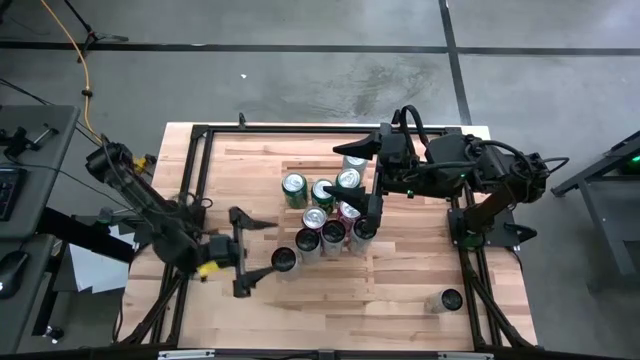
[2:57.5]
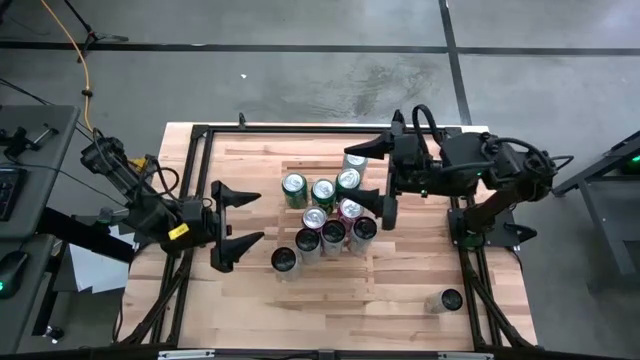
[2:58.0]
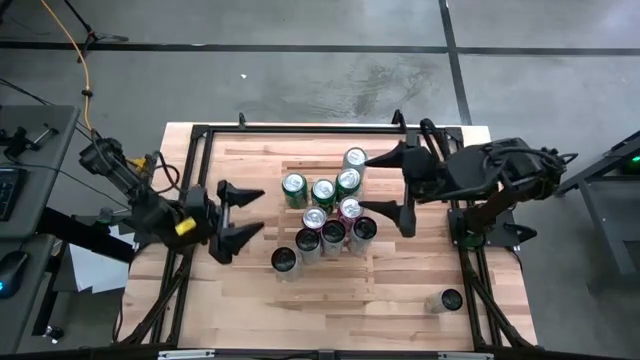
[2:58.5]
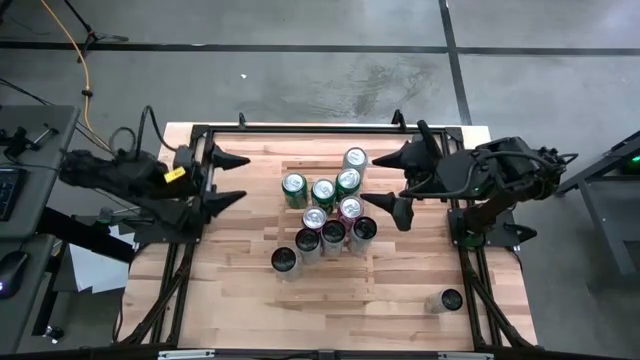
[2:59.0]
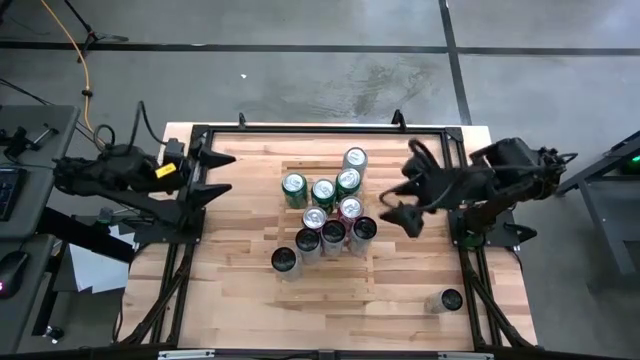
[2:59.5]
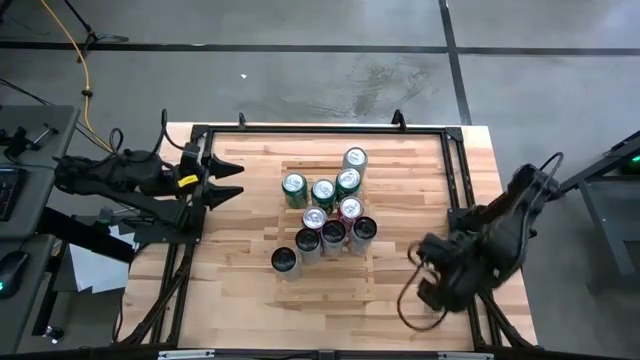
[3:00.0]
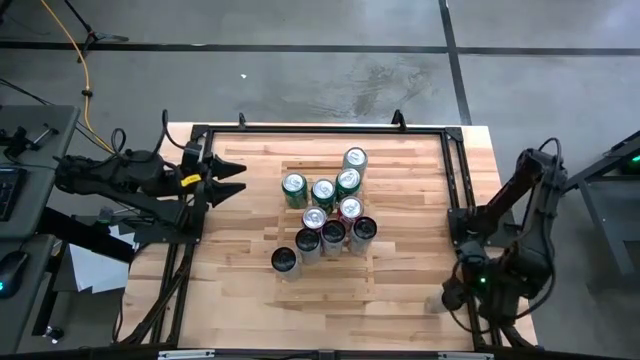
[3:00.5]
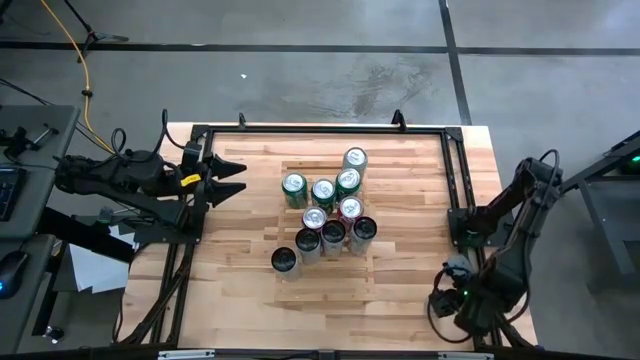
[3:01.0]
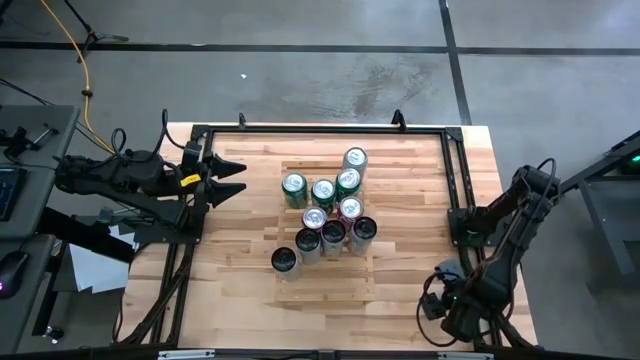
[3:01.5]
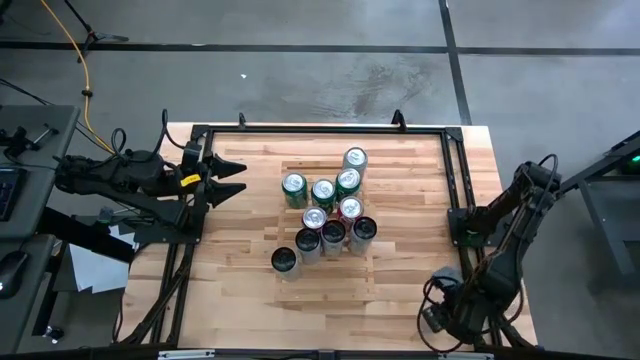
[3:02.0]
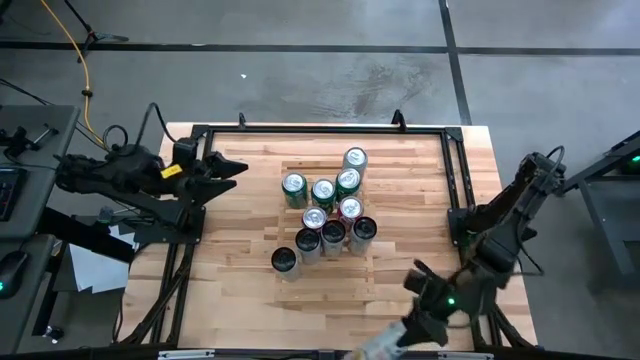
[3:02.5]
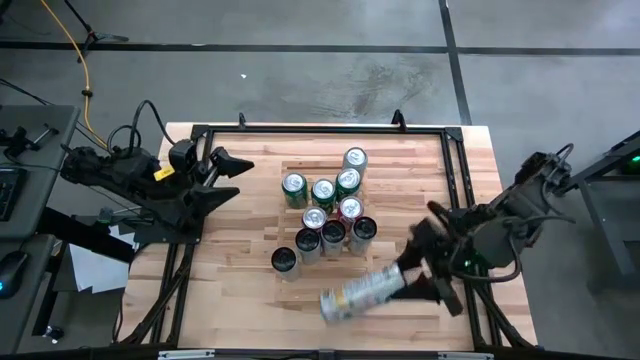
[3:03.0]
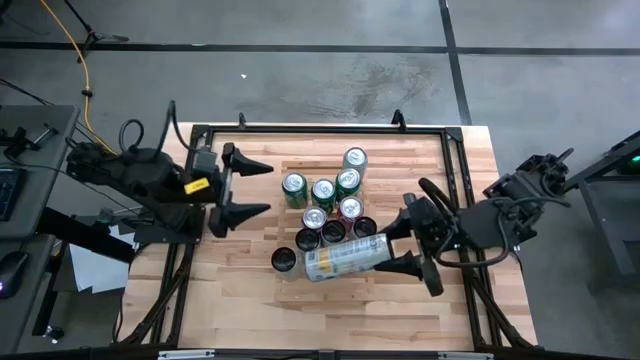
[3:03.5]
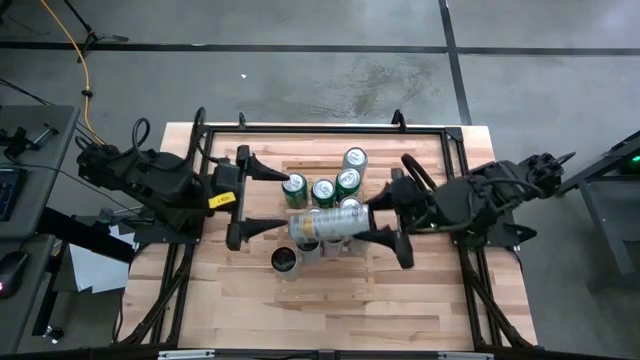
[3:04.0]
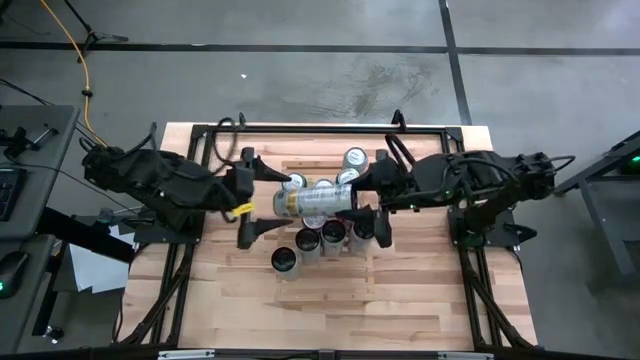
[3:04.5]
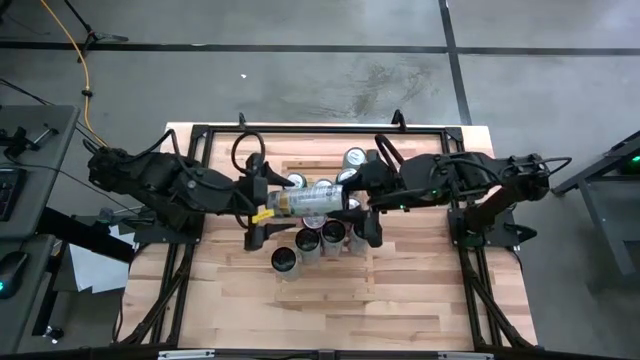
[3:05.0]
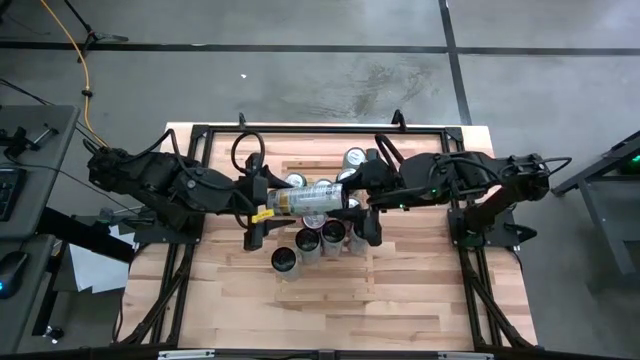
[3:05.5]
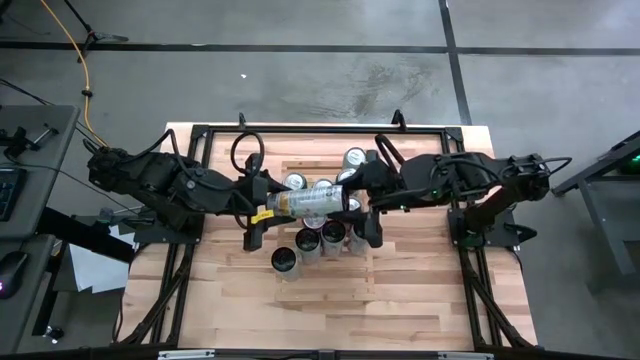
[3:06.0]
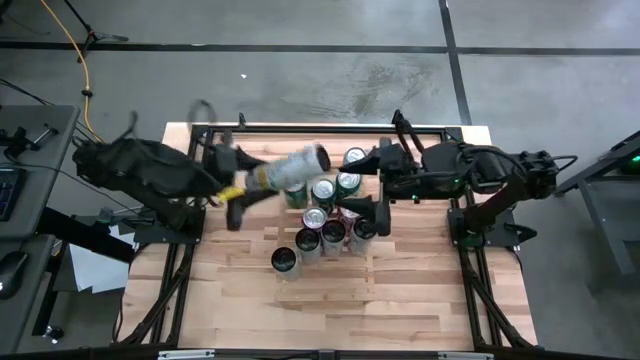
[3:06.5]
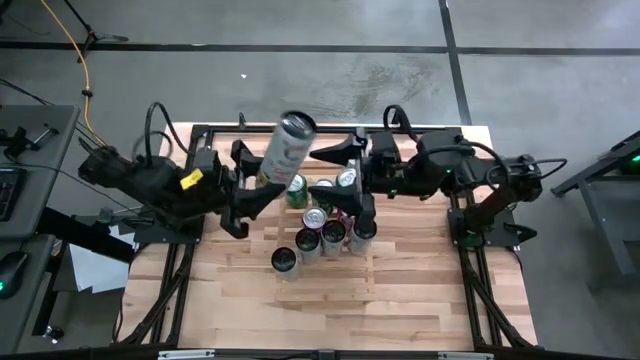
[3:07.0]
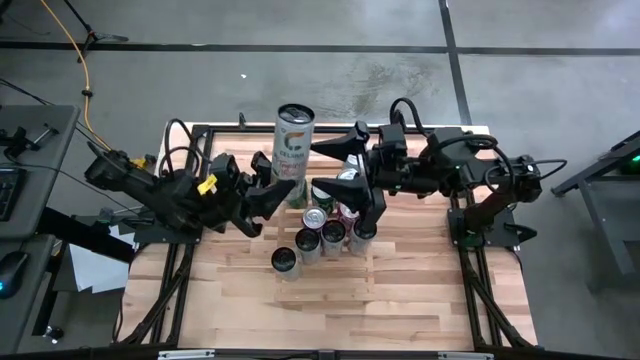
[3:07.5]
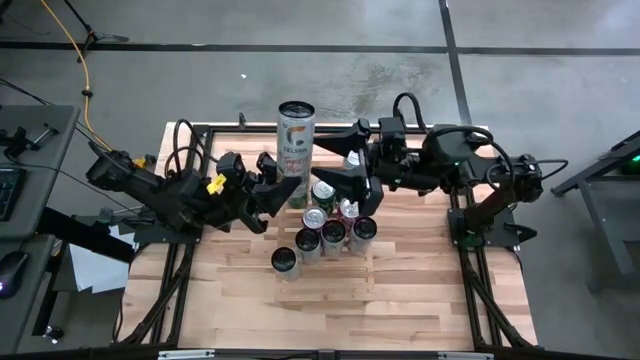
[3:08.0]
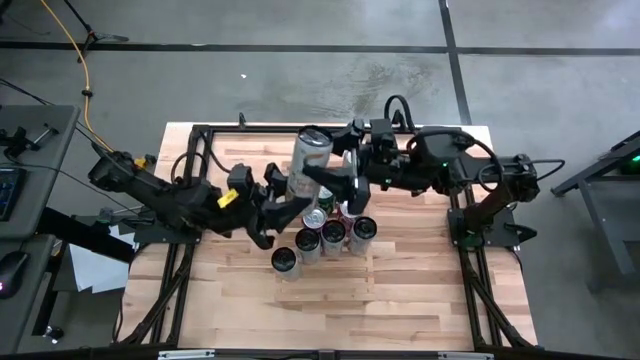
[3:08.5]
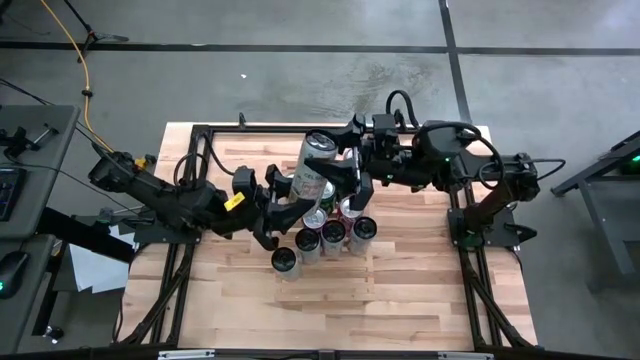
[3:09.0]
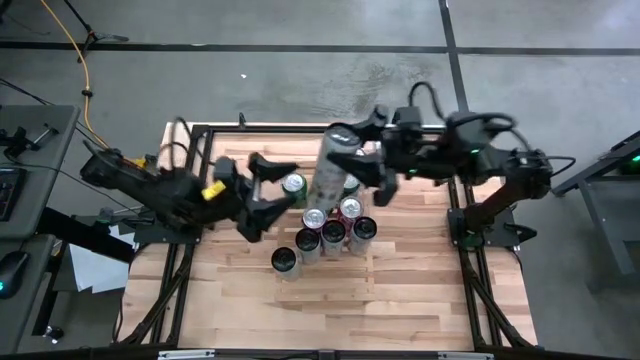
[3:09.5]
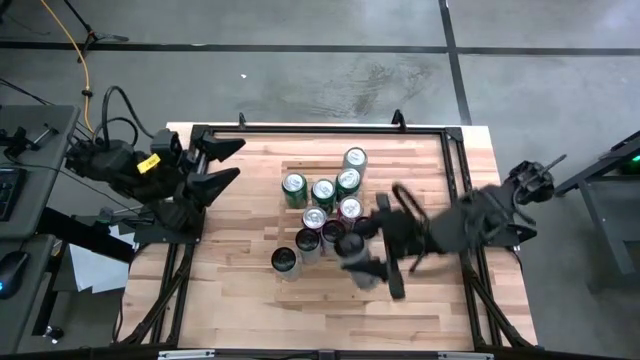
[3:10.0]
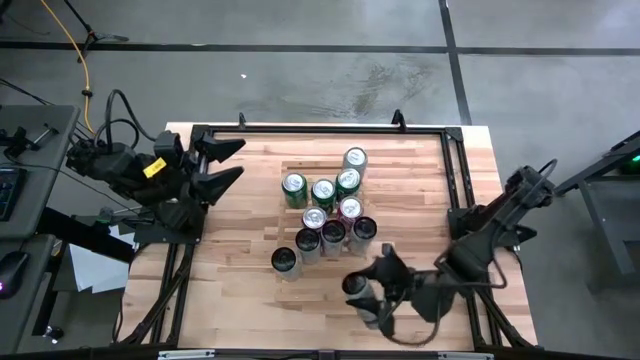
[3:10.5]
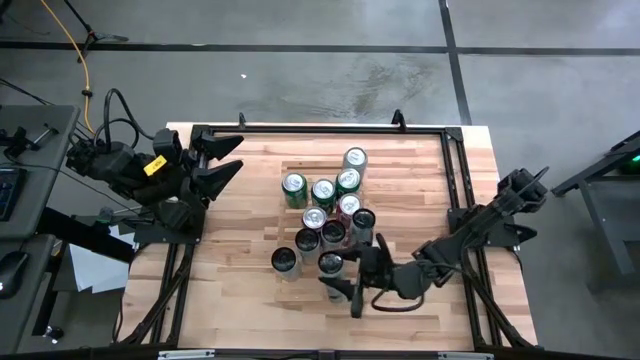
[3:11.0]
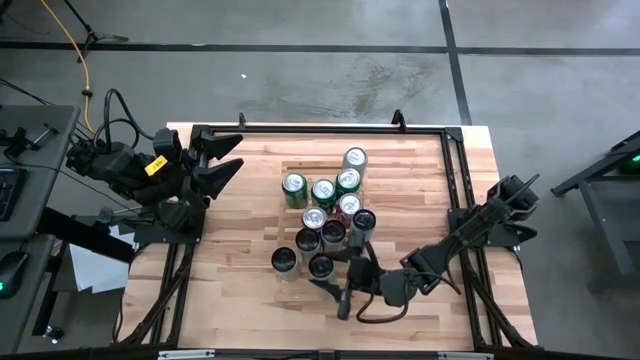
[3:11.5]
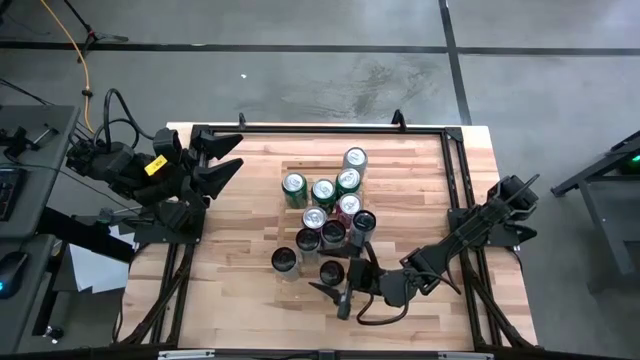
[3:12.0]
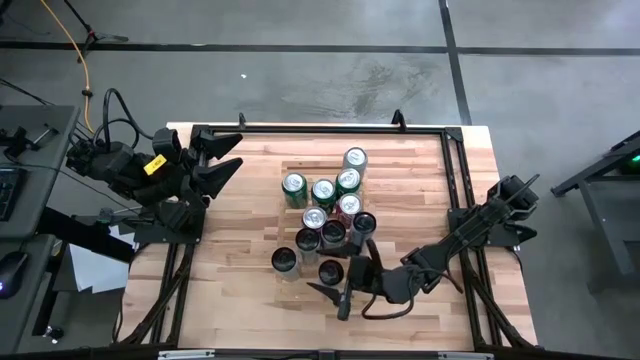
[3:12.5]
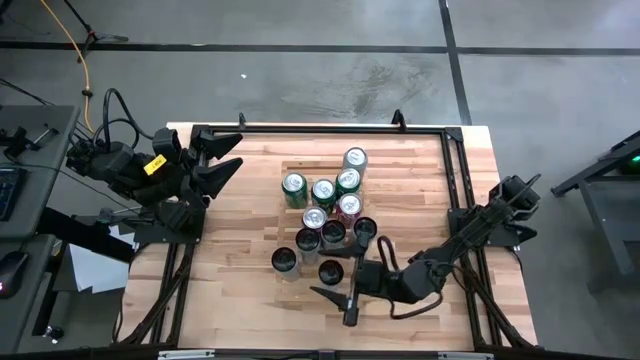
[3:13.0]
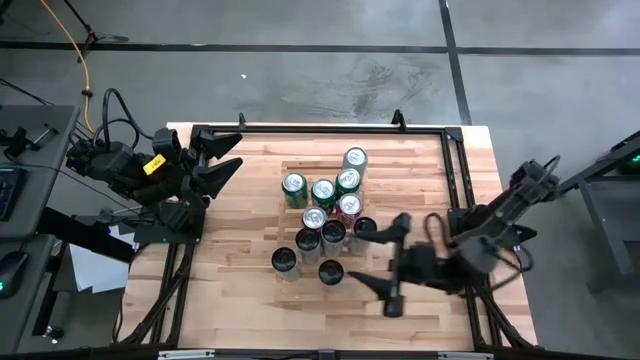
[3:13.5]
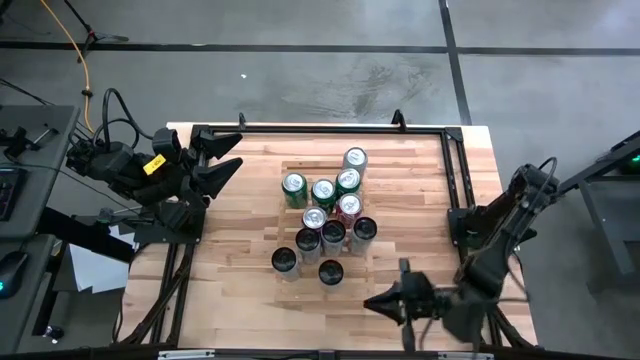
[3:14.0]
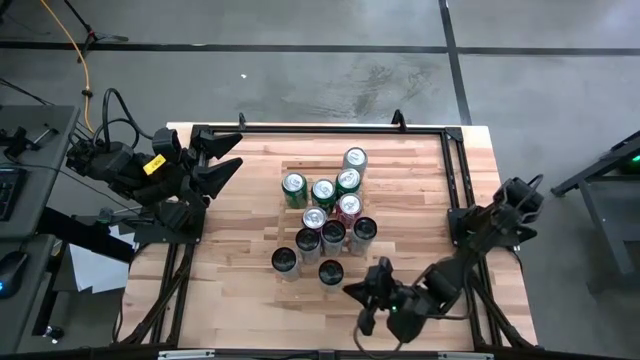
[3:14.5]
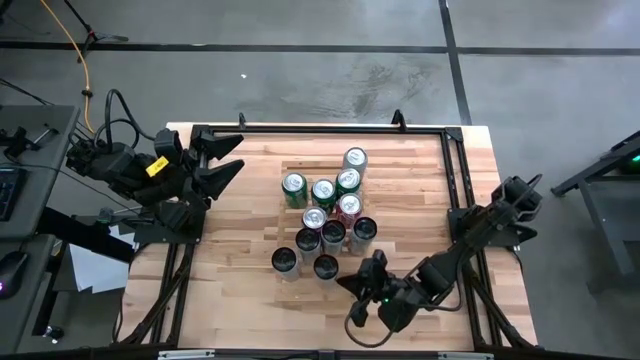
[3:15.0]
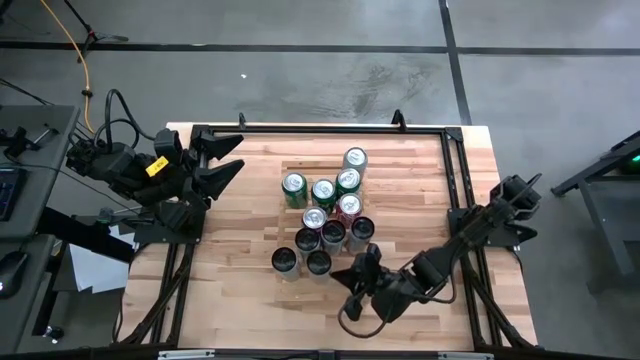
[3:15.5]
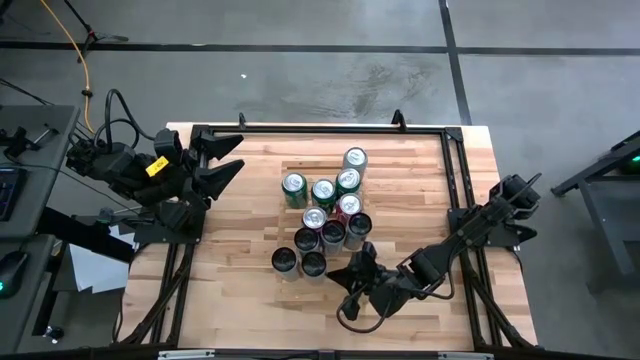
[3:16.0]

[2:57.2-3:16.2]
Task: Place canned beverage on shelf
Put the white yellow soda can on the shelf aligned with the other white yellow soda can

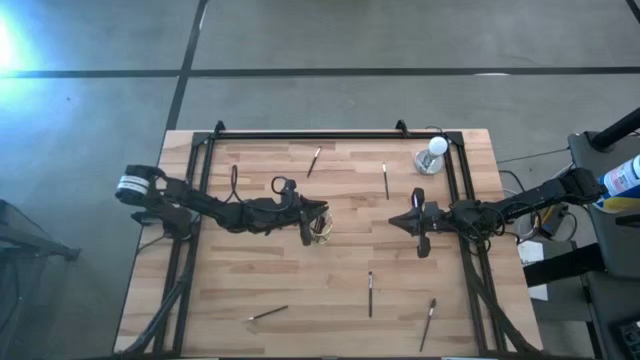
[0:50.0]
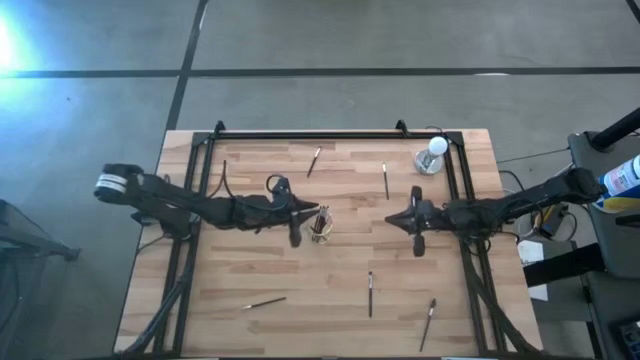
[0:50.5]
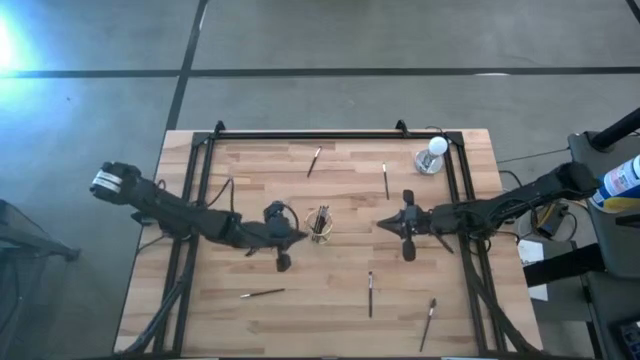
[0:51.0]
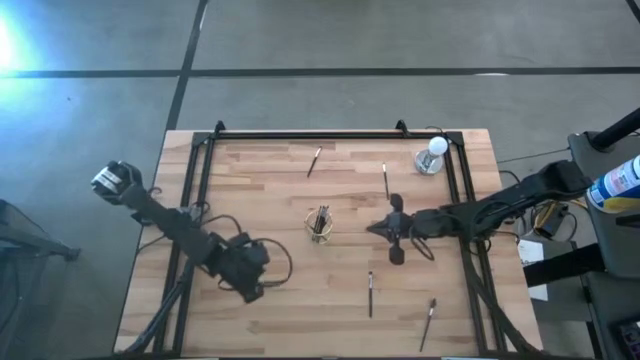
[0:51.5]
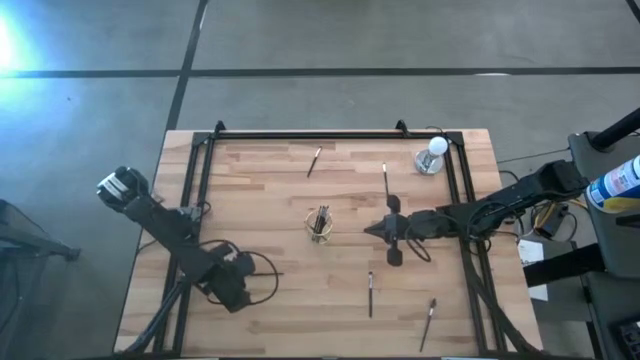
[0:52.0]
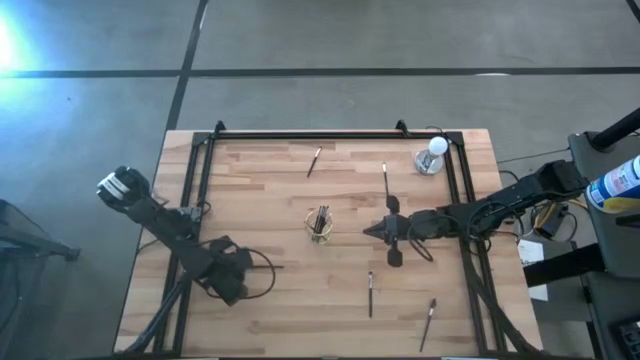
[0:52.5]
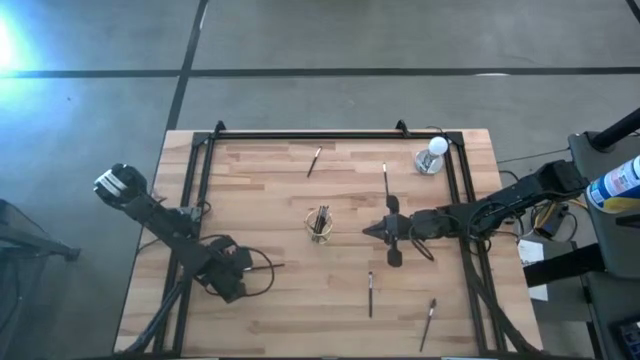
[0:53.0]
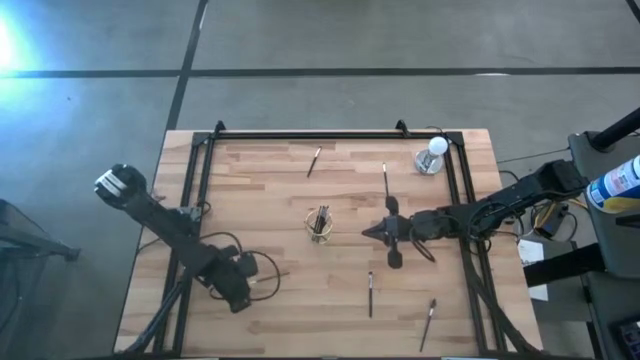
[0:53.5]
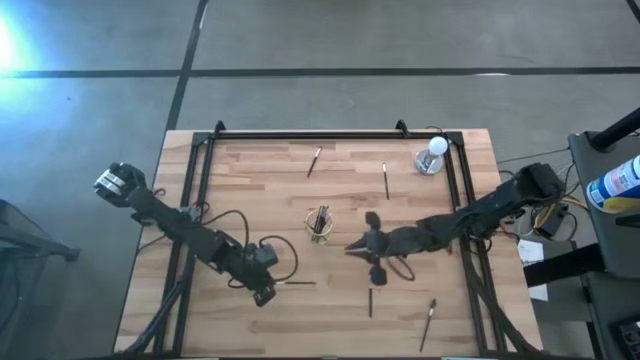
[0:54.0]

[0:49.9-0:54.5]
Task: Pick & Place Makeup Brushes
Put the liner brush into the gold makeup brush holder
